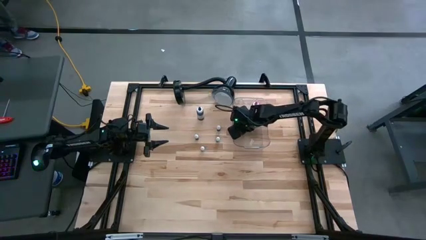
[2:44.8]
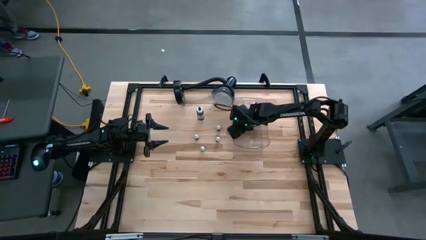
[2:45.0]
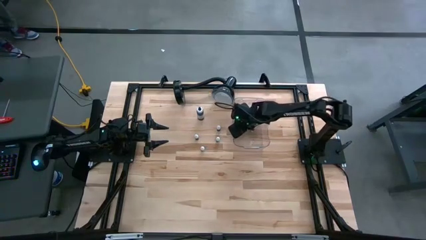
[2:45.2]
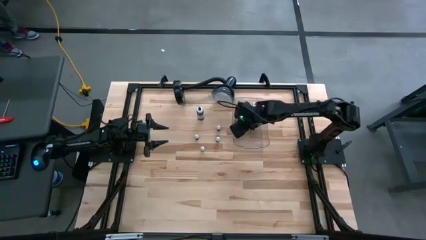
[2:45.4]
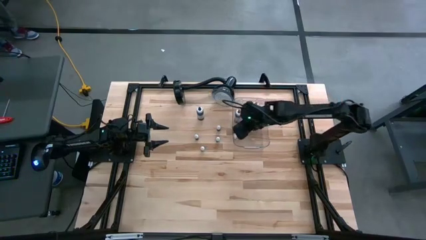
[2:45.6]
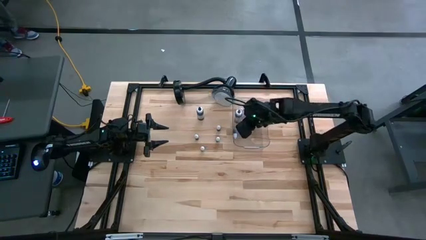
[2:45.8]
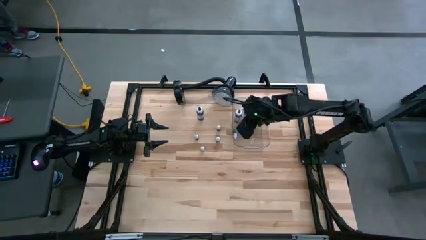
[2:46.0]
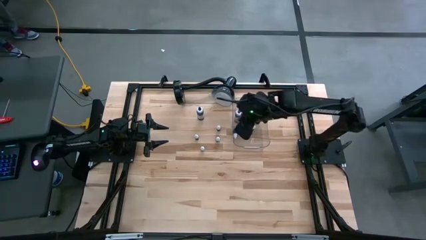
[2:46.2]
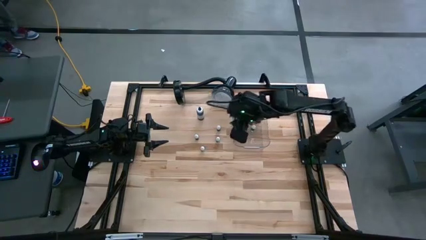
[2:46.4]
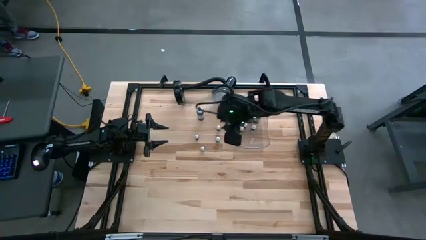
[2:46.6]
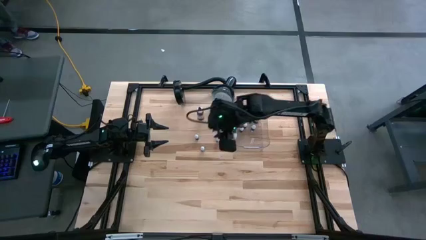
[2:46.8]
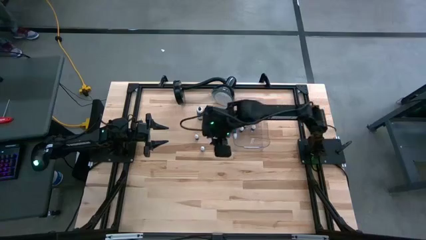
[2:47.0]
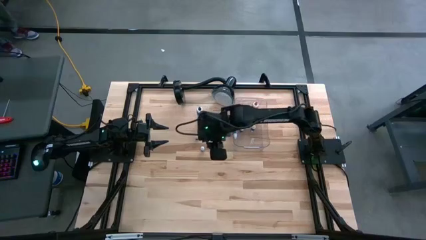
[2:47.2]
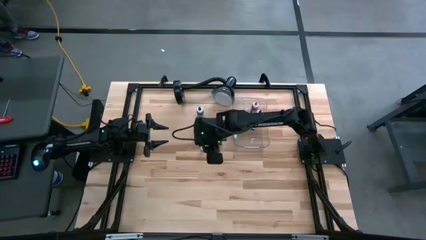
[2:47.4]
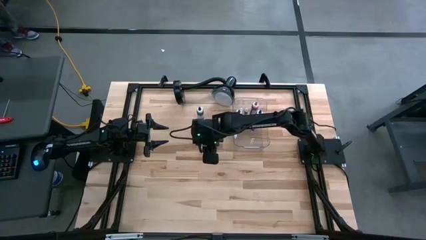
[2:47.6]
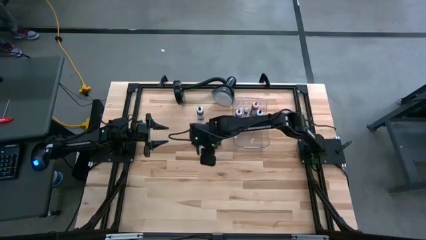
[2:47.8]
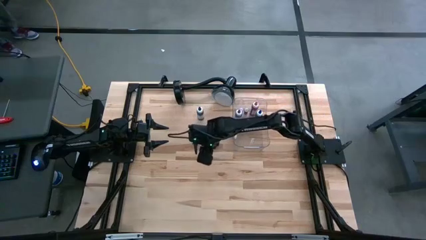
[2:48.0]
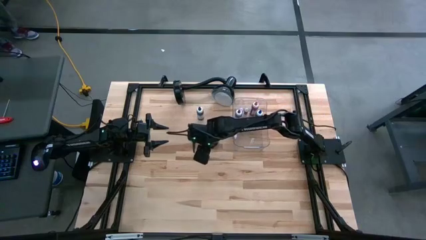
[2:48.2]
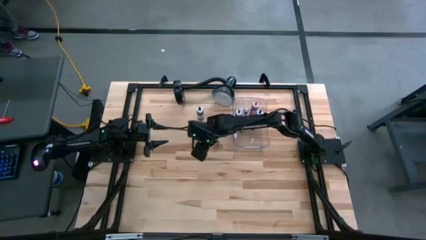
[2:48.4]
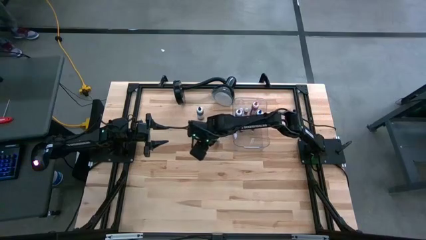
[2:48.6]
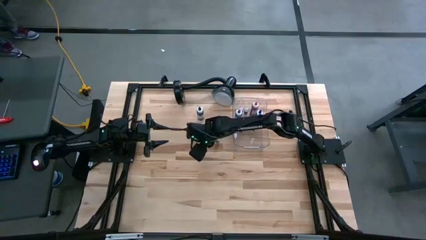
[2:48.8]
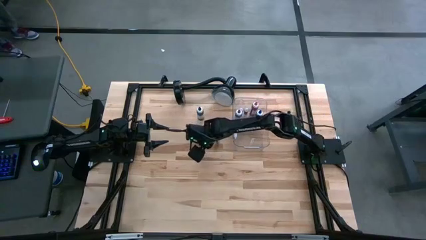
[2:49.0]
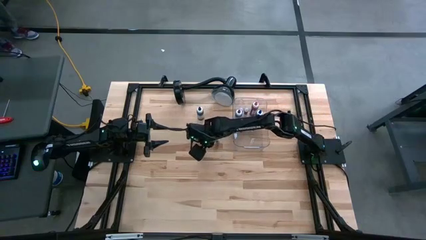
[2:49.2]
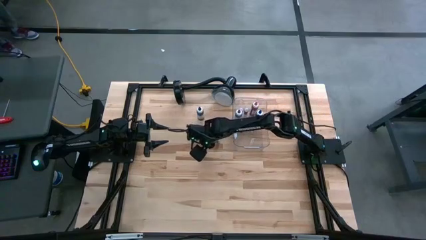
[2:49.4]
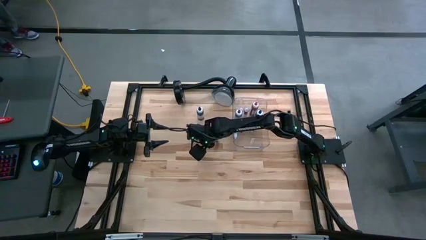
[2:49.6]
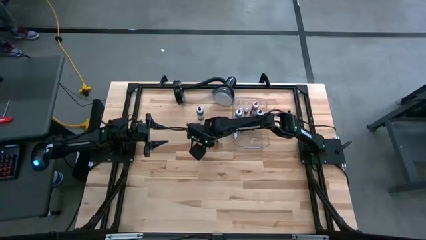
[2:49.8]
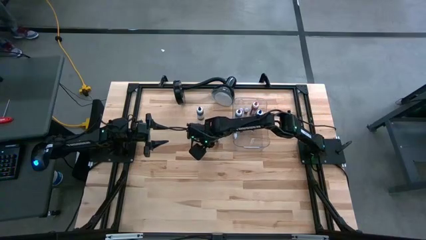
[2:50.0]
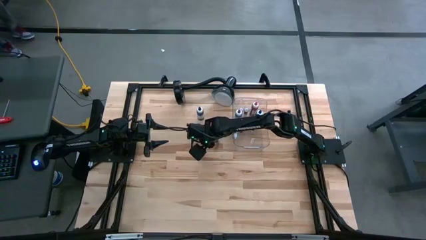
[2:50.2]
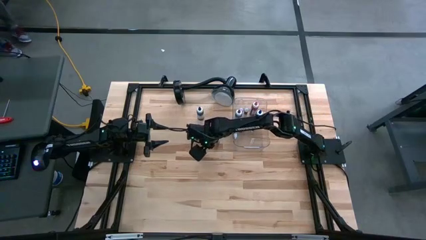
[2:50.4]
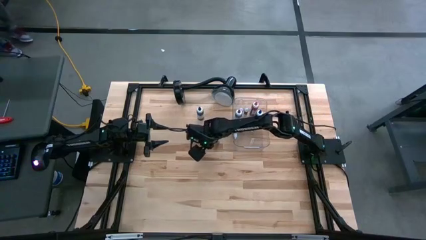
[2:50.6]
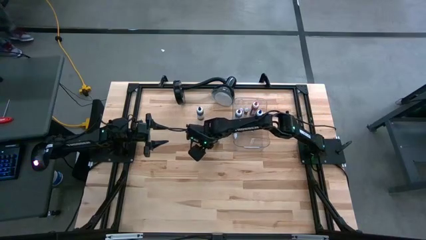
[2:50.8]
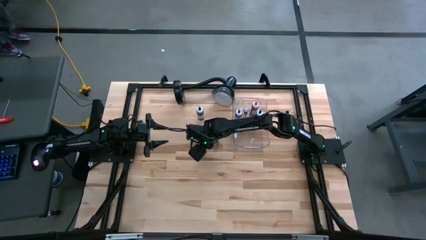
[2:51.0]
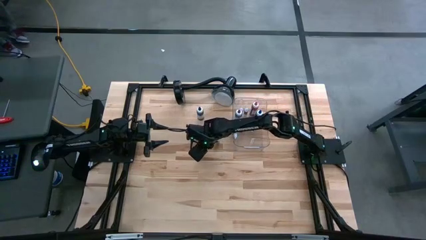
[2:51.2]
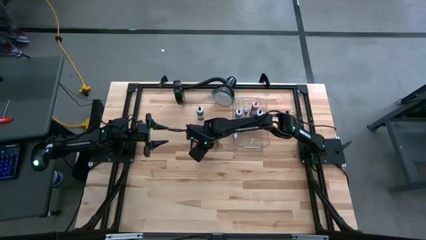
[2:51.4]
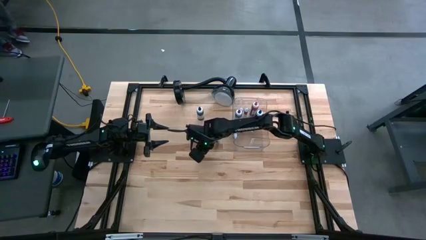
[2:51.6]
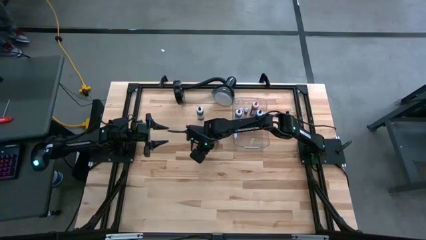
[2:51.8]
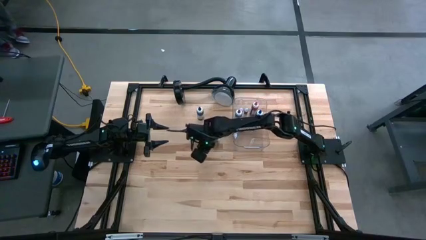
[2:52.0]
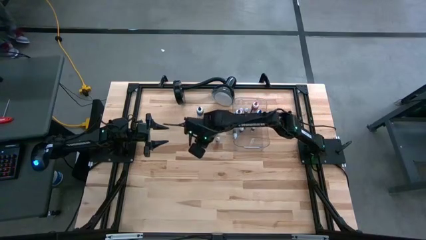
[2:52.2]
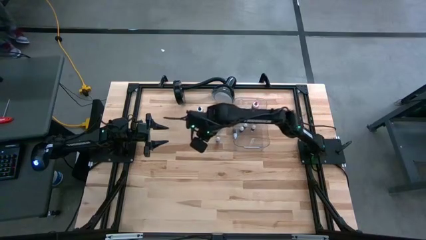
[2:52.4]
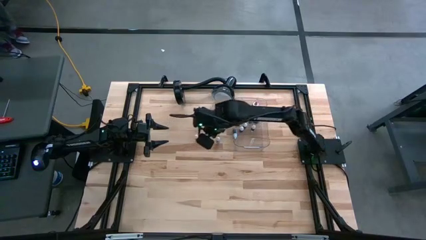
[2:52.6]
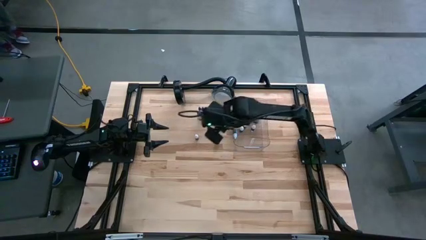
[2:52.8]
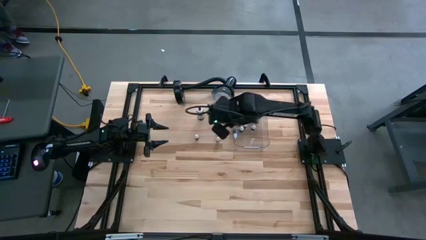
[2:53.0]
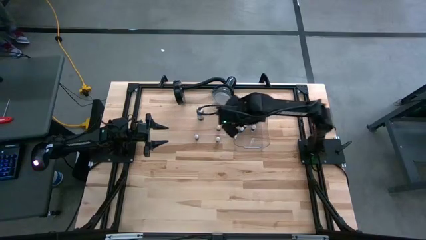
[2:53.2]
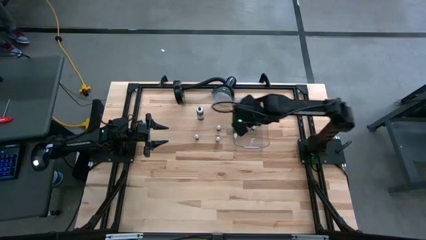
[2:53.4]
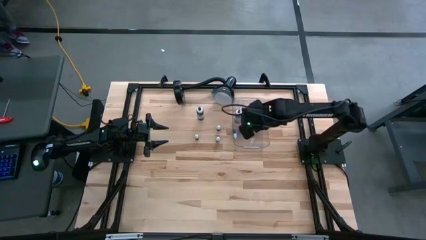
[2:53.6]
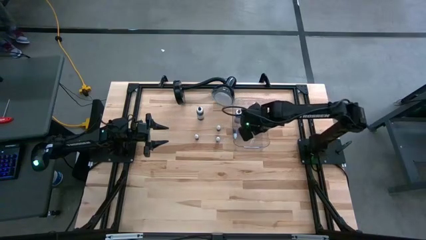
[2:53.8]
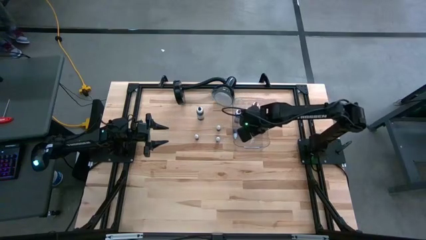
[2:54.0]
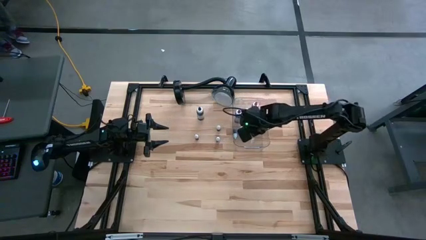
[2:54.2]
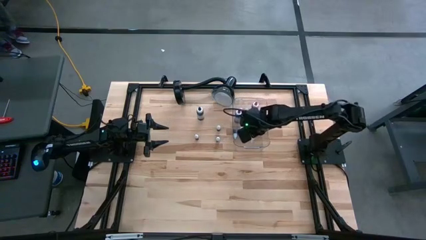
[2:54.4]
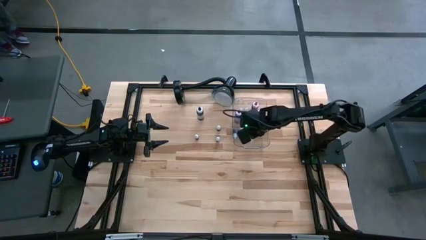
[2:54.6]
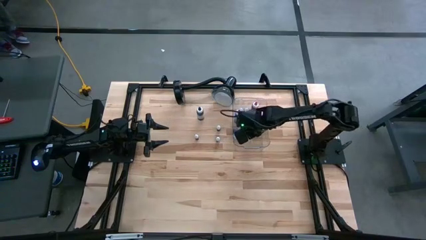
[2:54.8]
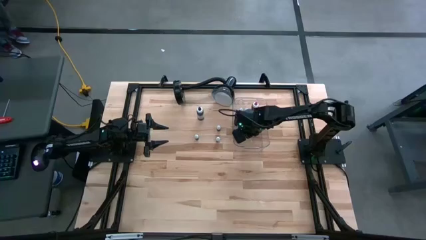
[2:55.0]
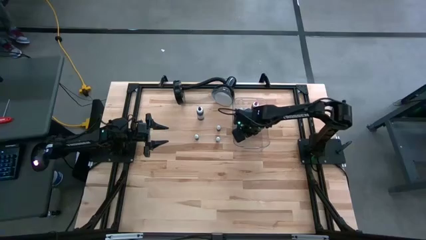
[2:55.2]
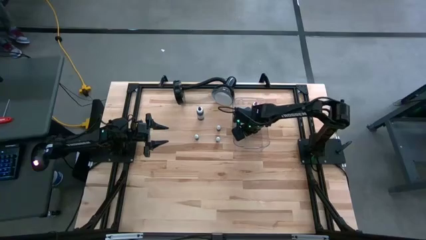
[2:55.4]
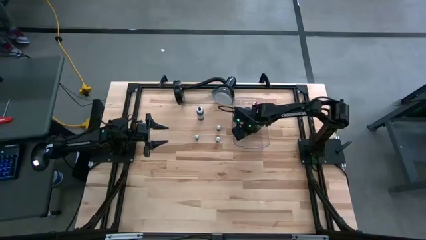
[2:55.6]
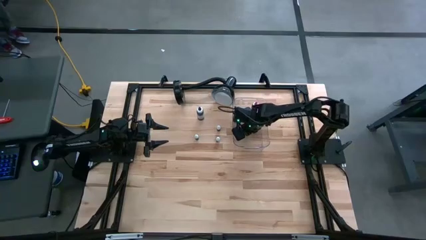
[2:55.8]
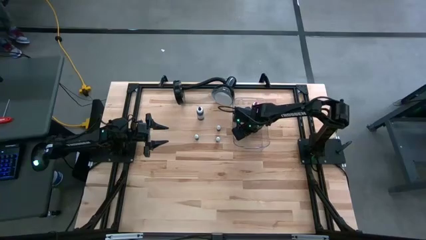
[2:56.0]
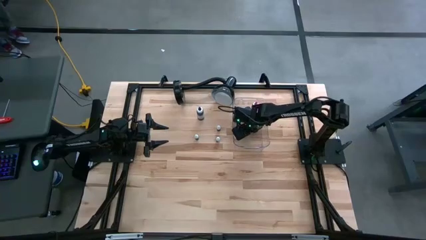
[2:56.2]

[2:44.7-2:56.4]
Task: Pick & Place food coloring
Put the small green food coloring bottle into the transparent bin

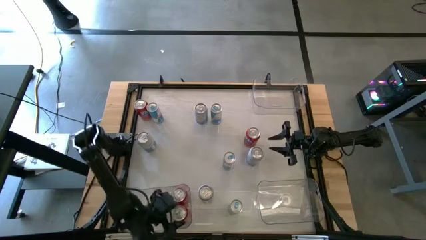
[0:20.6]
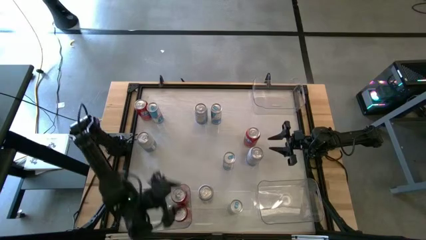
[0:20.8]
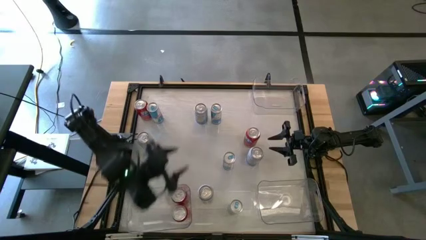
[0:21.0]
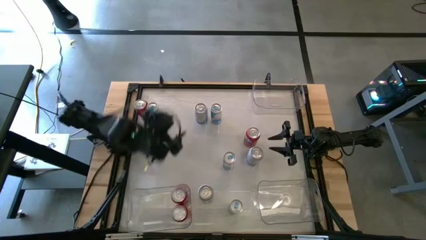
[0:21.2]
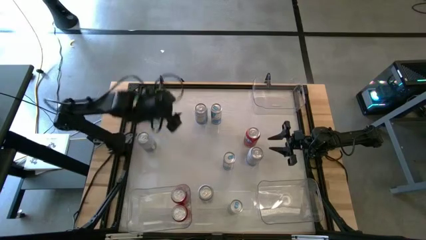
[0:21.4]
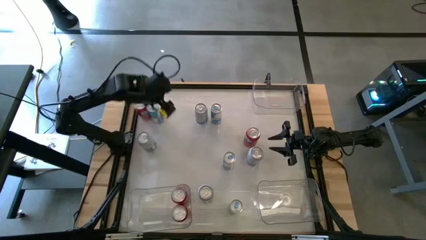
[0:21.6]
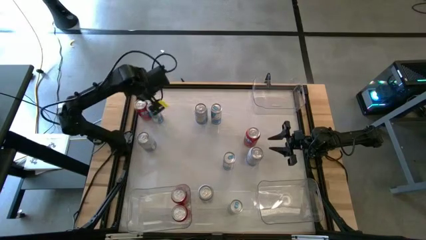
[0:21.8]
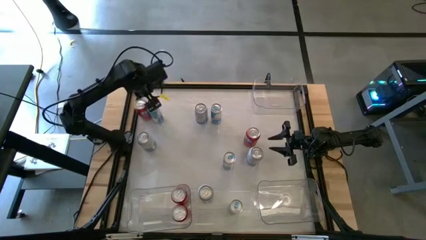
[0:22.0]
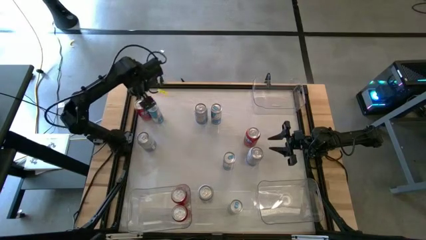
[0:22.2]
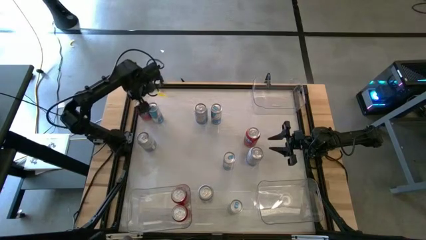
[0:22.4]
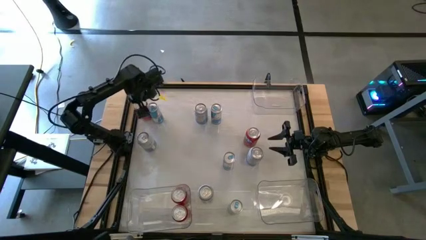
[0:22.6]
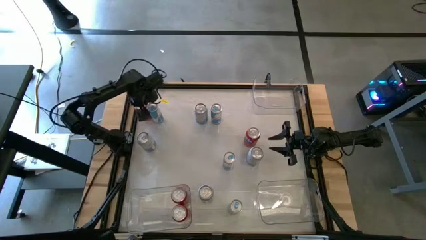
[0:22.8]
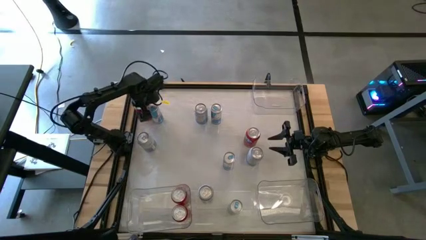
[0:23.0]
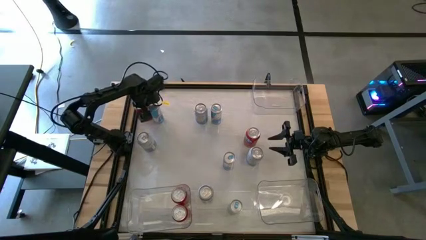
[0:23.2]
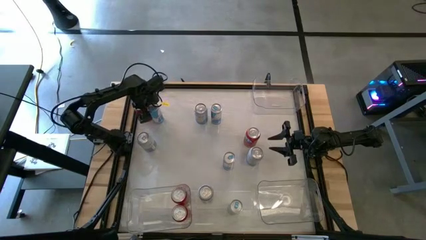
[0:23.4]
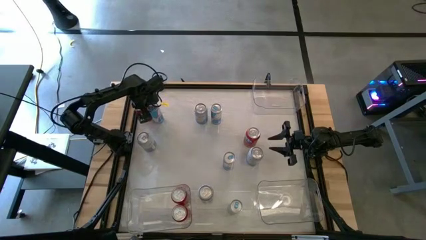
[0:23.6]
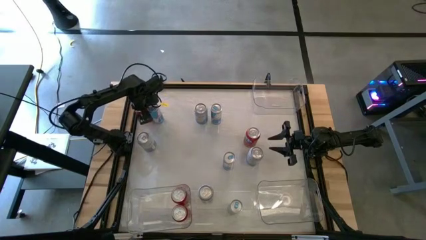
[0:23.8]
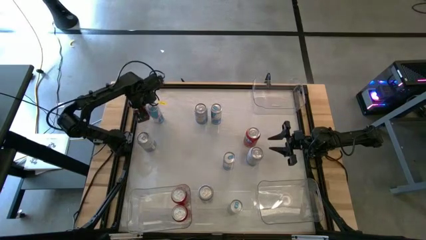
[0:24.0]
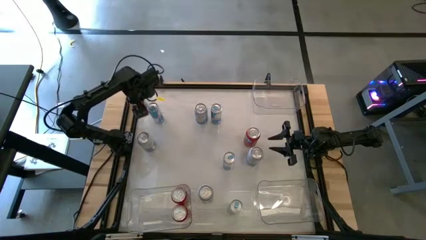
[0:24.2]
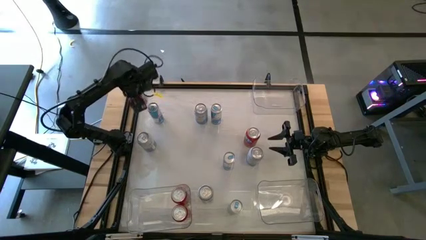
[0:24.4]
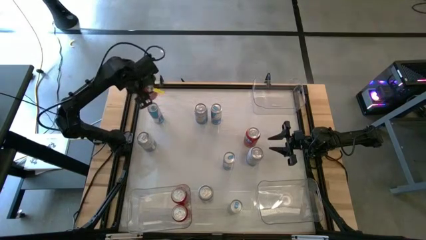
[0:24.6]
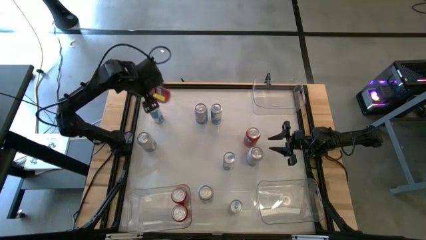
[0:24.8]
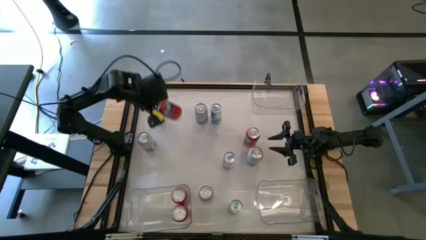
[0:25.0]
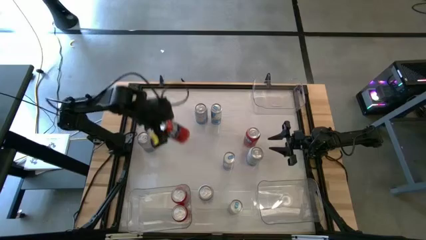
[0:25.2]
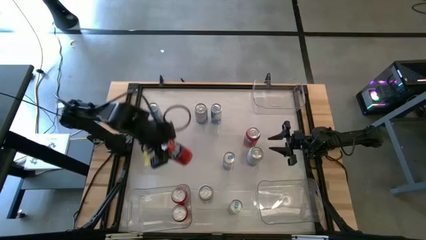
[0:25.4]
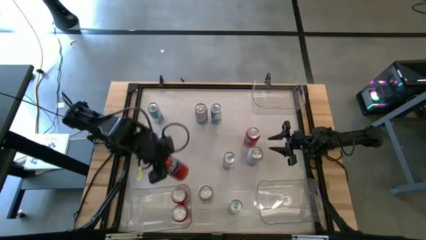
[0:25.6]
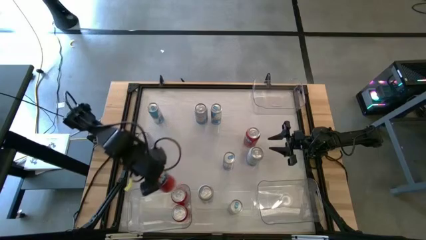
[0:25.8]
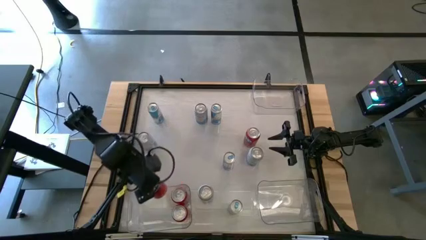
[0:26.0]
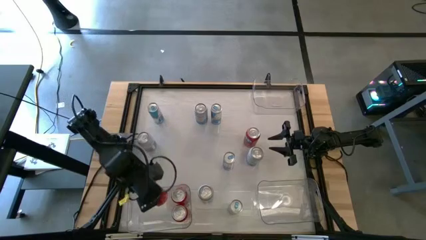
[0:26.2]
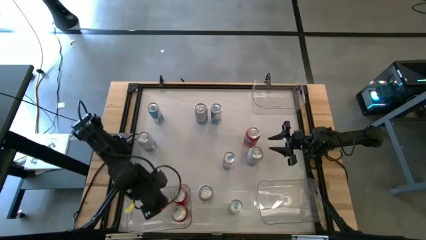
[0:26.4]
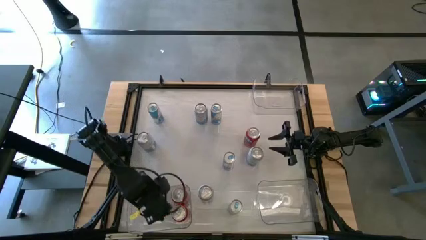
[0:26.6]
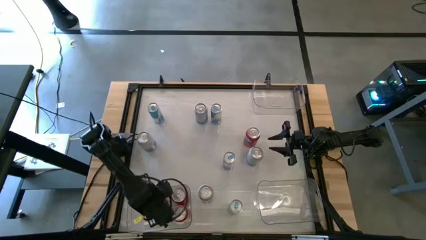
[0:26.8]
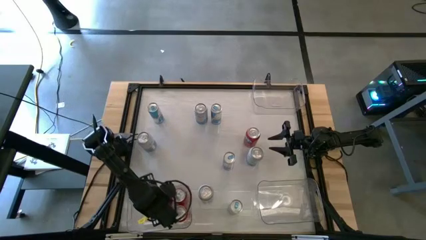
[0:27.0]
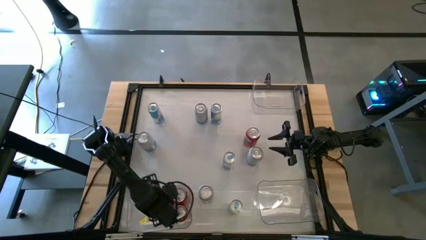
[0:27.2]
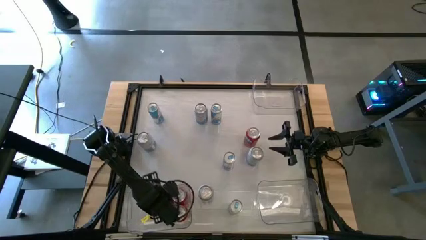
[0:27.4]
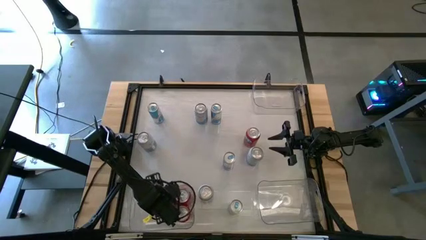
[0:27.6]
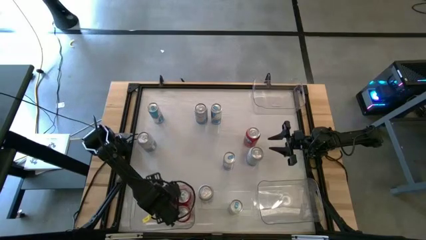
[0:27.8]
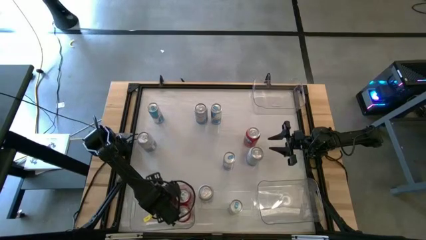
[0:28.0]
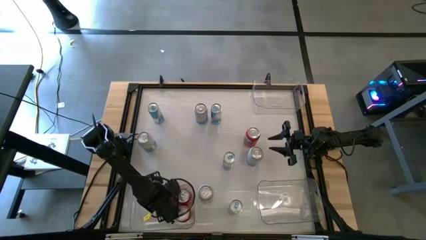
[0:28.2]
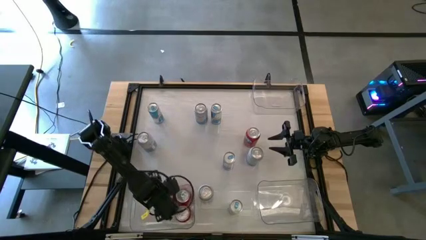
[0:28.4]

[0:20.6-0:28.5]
Task: Sort soda cans
Put the top orange soda can into the bottom left transparent bin
